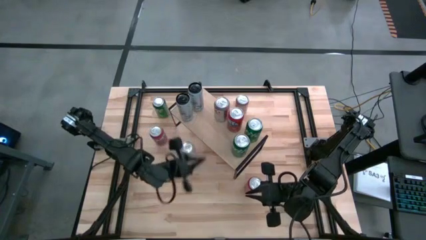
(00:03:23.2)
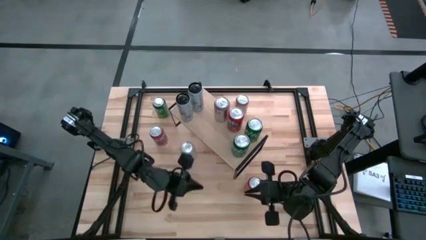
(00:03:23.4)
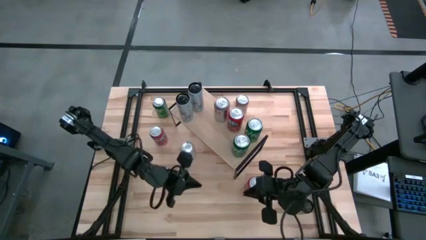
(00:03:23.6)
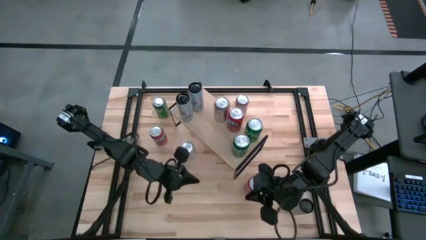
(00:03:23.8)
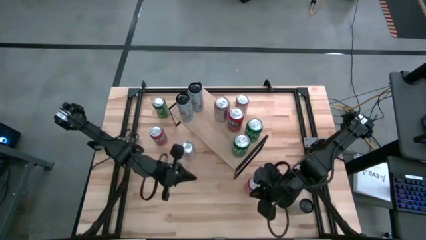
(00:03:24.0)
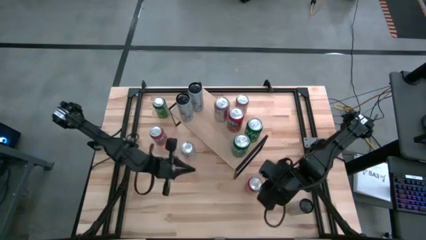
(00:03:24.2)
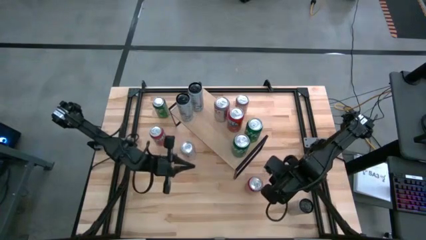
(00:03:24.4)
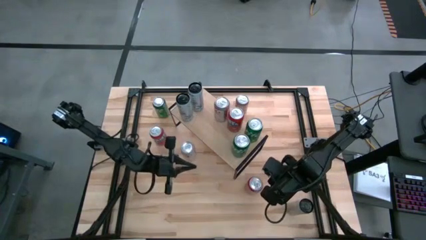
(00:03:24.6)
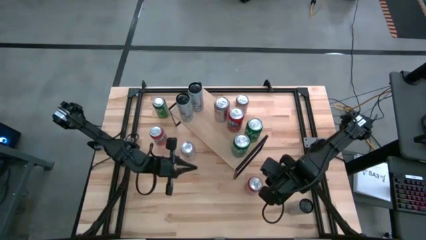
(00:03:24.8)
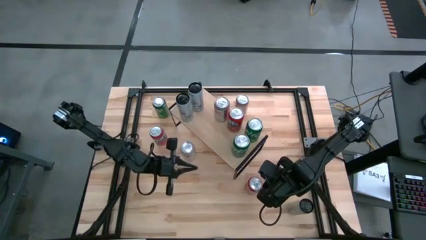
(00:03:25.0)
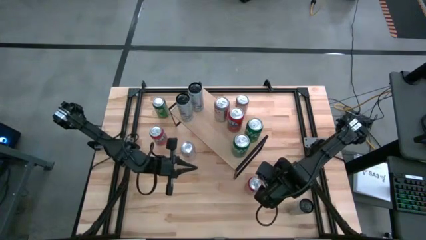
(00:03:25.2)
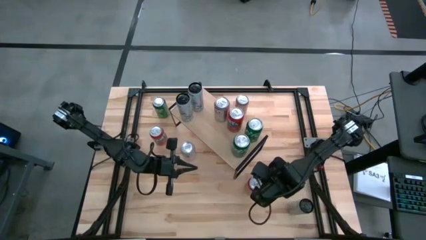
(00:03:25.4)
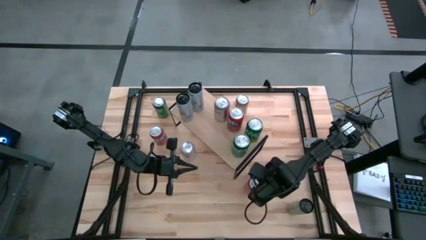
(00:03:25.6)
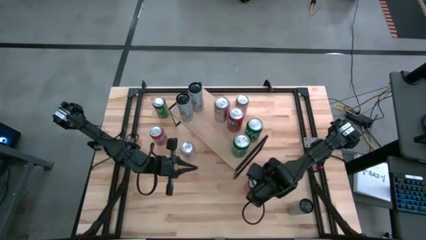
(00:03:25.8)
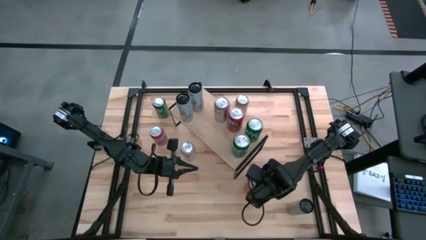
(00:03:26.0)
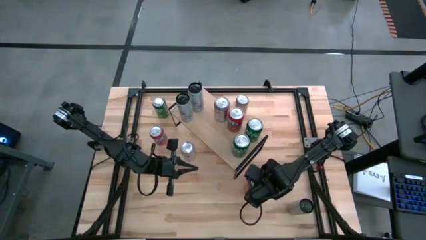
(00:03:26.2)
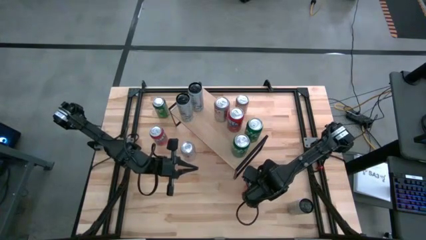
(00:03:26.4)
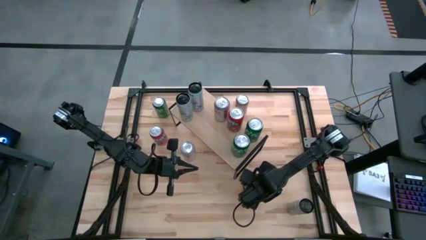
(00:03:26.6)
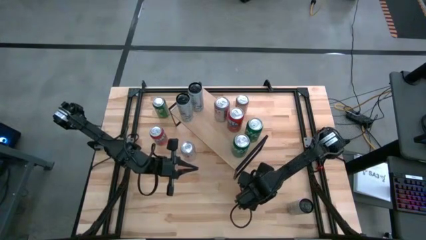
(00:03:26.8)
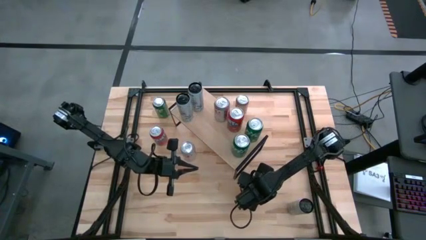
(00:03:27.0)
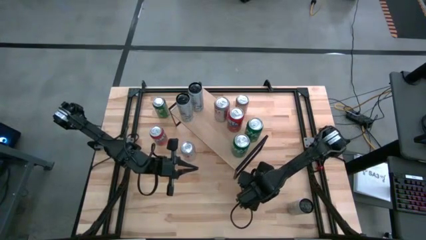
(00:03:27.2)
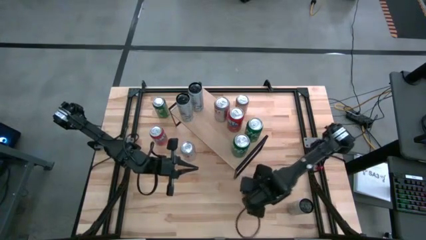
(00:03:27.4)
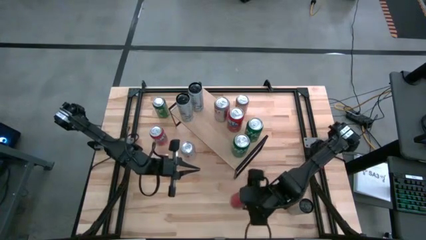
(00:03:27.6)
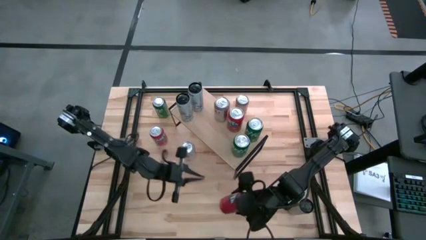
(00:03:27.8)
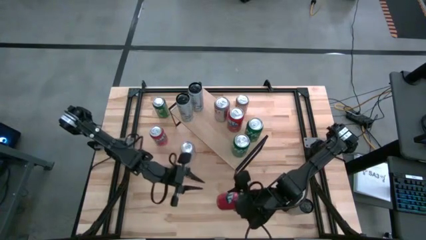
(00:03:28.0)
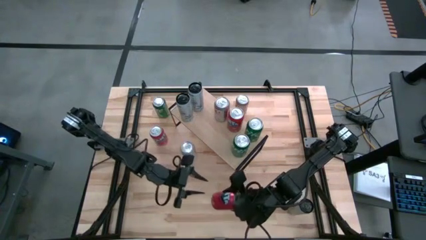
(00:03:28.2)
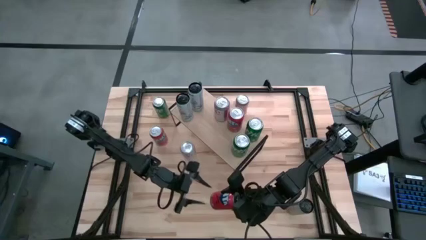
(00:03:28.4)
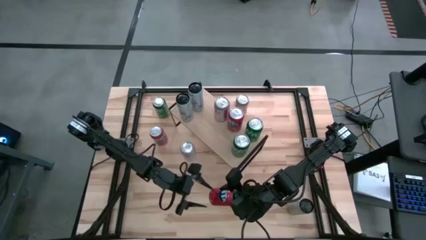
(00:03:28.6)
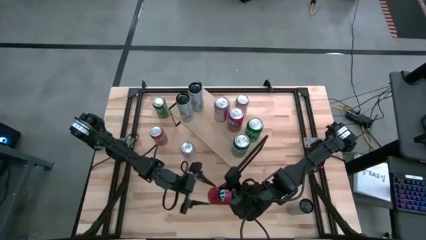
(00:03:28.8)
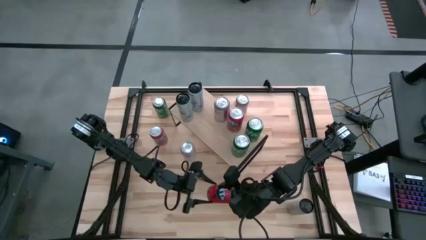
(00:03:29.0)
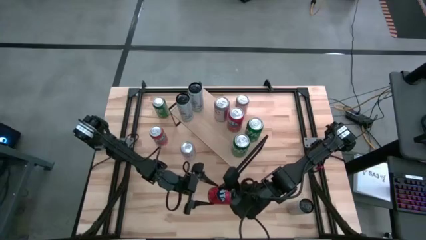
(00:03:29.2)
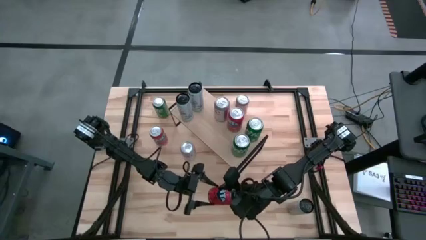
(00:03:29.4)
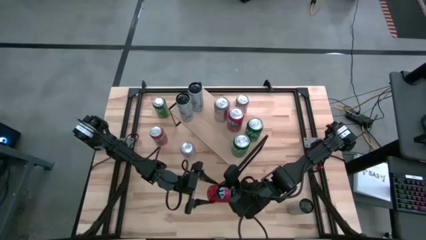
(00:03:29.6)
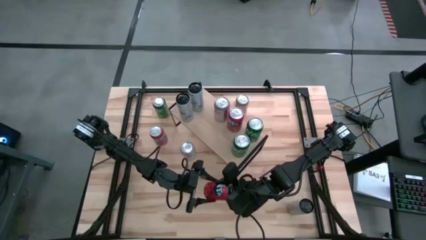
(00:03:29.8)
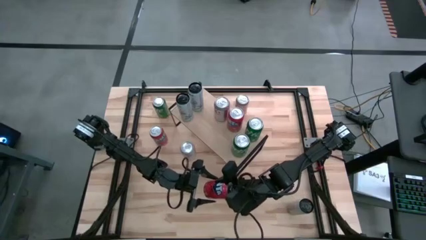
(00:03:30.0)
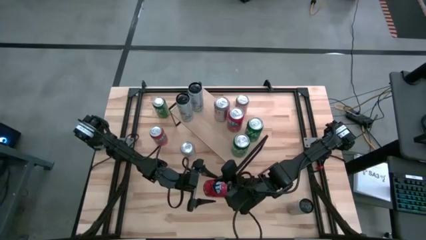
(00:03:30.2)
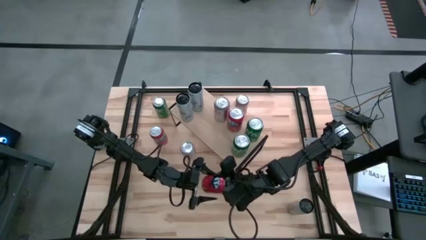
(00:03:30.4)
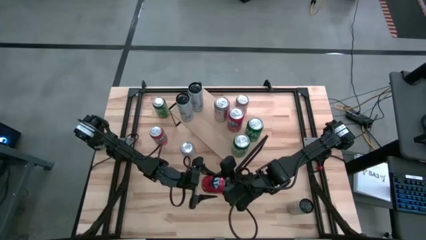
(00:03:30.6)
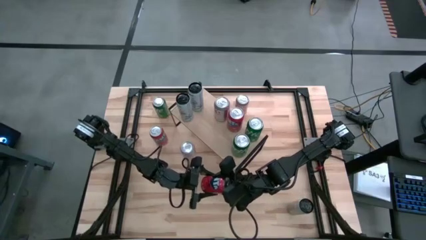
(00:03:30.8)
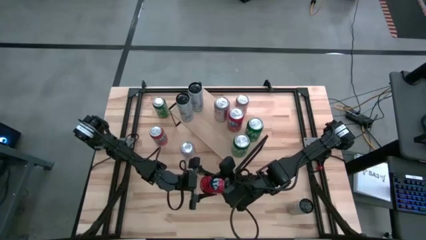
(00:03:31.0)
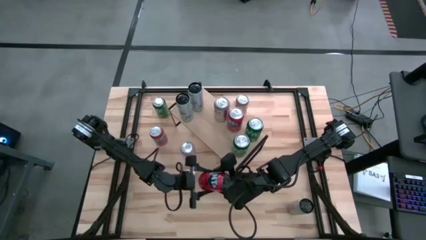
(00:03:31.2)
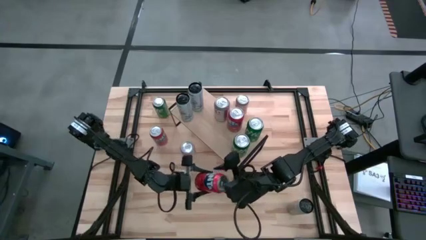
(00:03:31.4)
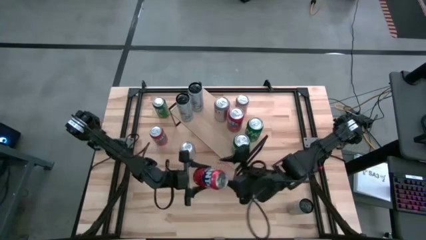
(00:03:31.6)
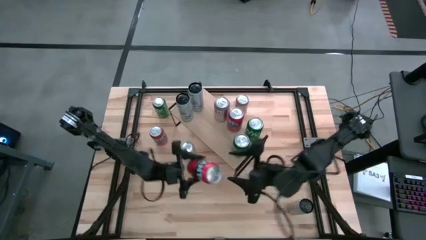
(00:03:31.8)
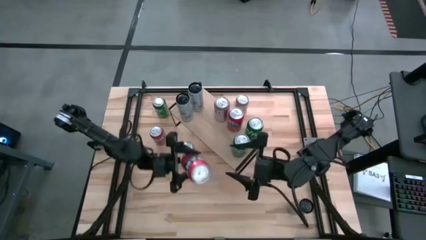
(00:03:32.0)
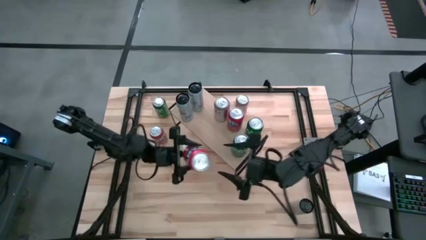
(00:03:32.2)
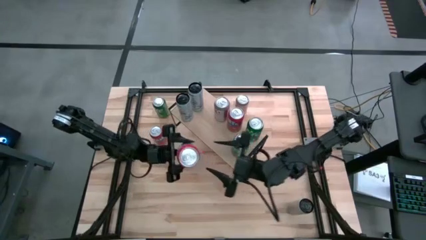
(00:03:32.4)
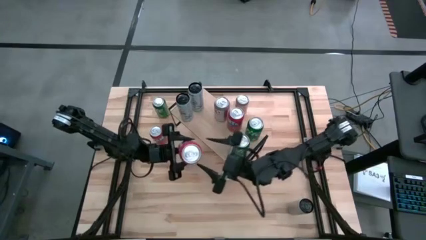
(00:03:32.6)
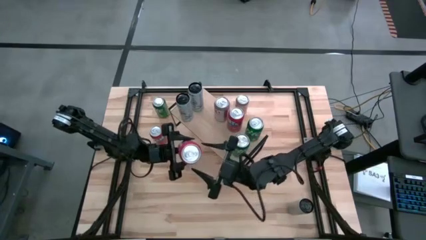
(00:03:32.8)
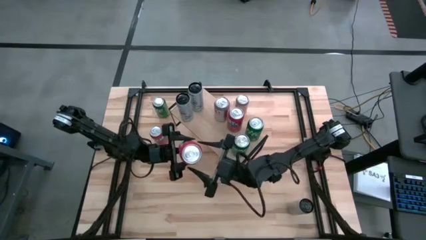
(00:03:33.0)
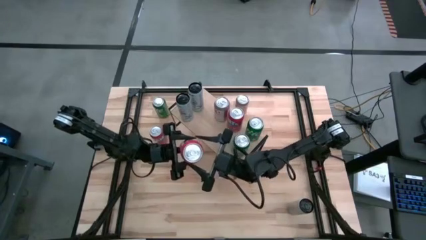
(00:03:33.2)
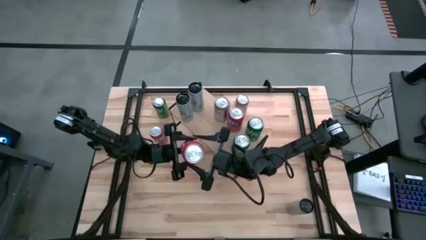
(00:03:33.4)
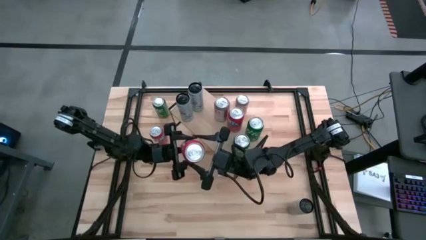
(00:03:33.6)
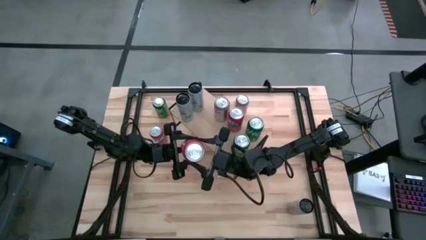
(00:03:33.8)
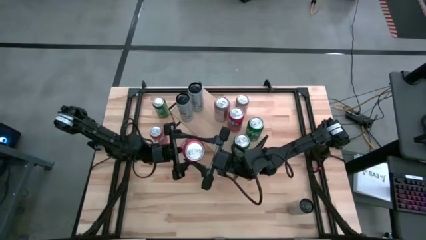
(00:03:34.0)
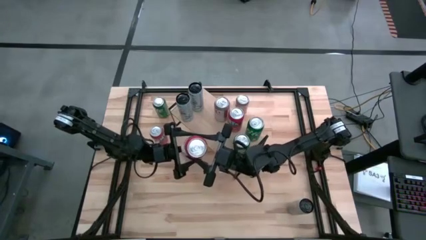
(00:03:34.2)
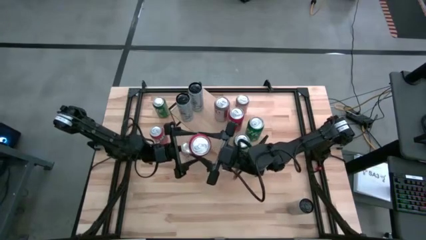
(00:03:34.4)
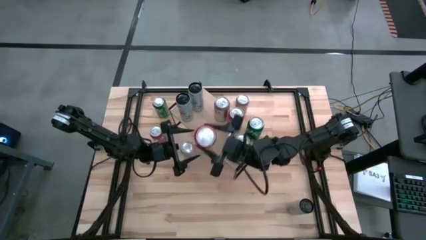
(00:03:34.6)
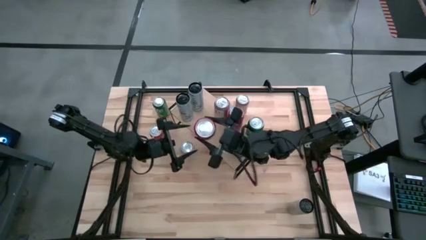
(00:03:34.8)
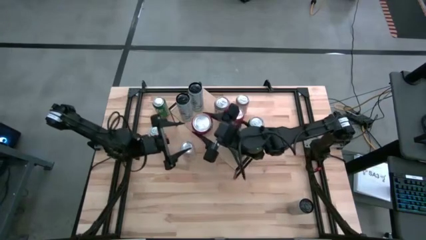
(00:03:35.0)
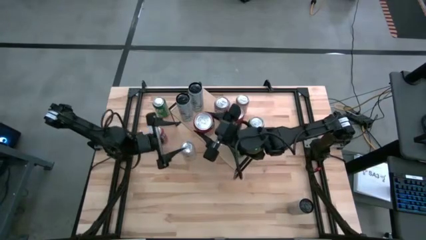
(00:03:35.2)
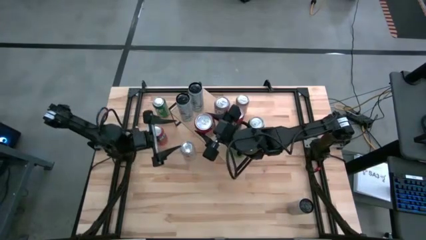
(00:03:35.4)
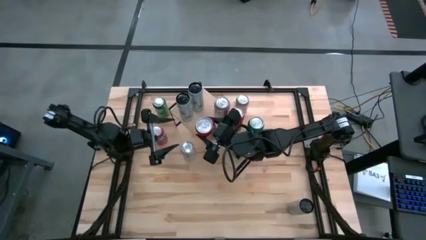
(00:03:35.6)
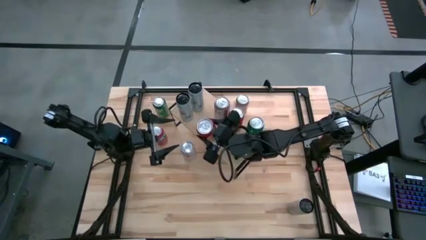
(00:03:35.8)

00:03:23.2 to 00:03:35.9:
Task: Place canned beverage on shelf
Put the right orange soda can on the shelf aligned with the other orange soda can

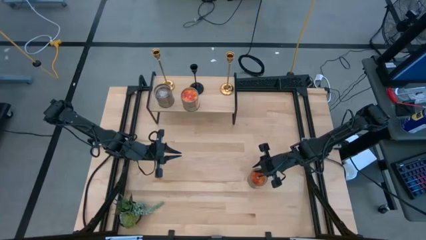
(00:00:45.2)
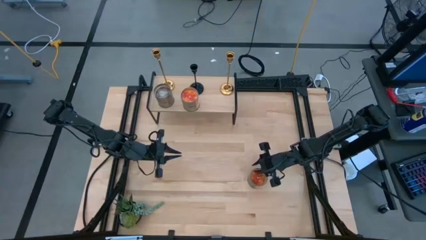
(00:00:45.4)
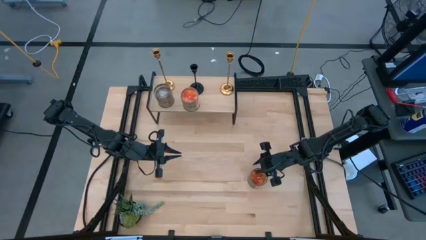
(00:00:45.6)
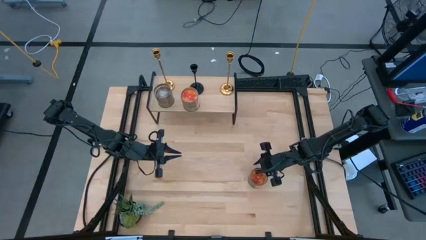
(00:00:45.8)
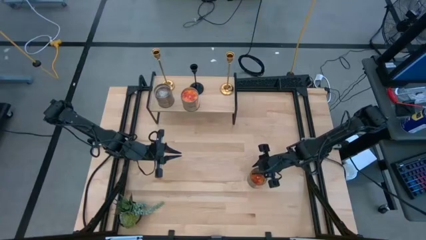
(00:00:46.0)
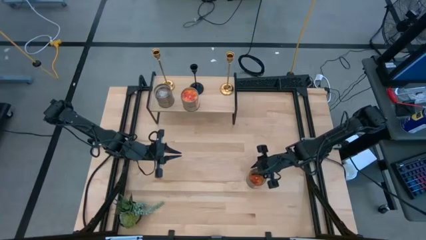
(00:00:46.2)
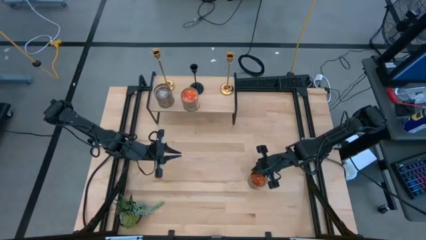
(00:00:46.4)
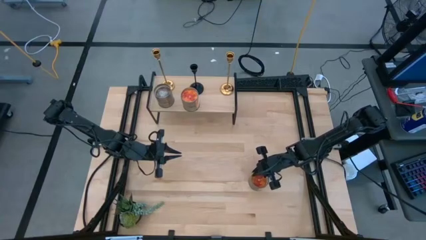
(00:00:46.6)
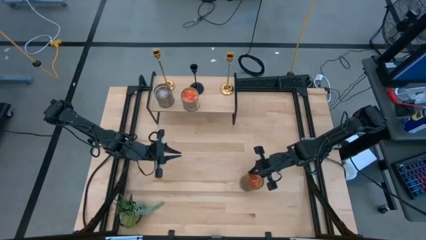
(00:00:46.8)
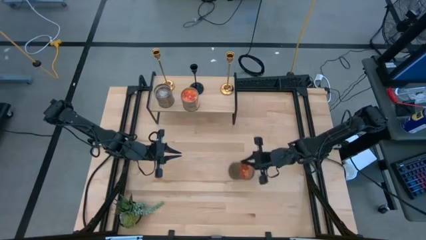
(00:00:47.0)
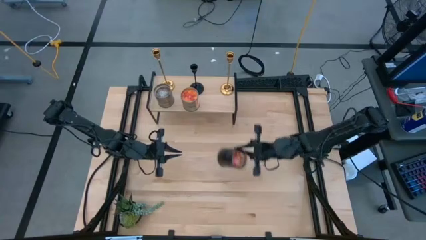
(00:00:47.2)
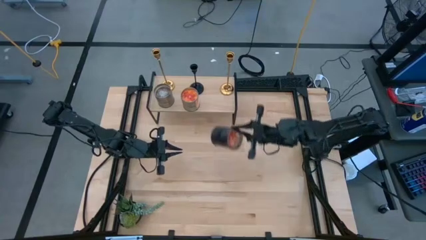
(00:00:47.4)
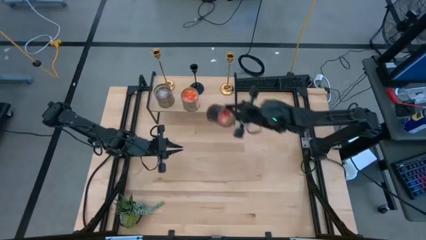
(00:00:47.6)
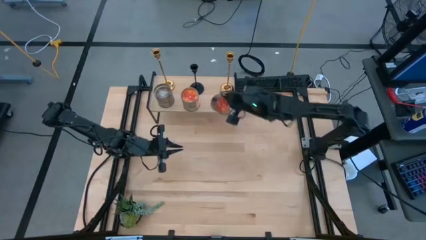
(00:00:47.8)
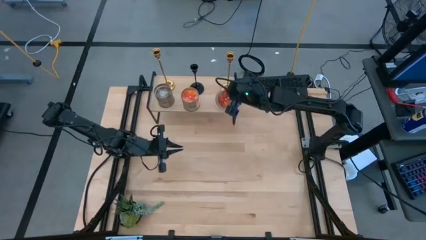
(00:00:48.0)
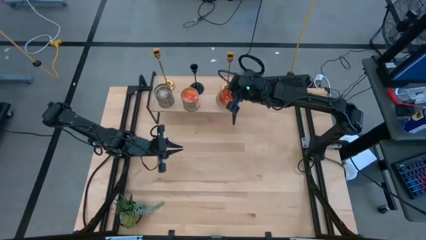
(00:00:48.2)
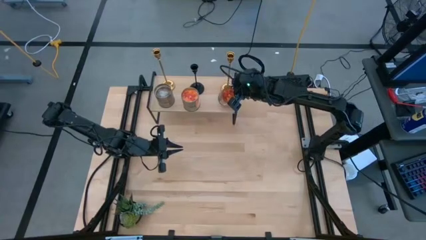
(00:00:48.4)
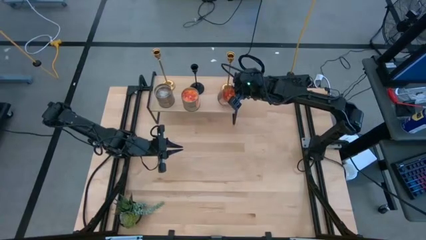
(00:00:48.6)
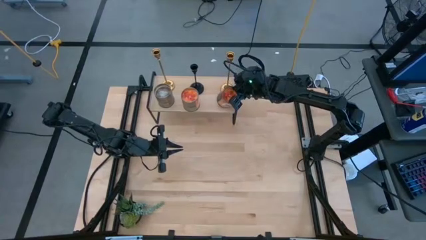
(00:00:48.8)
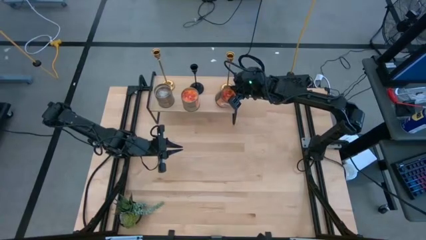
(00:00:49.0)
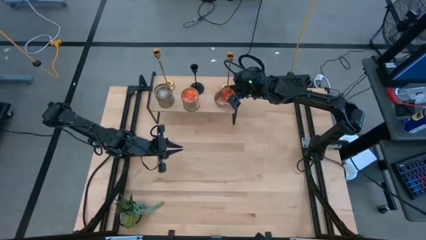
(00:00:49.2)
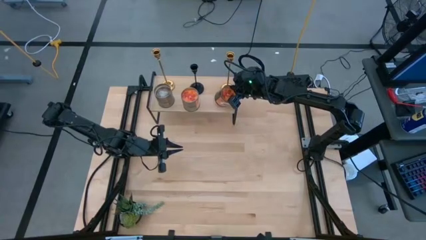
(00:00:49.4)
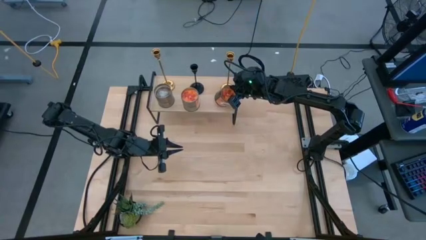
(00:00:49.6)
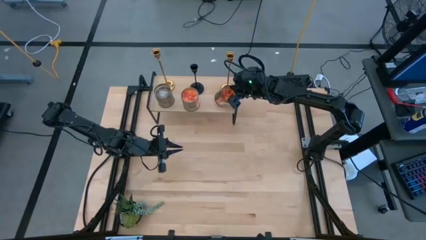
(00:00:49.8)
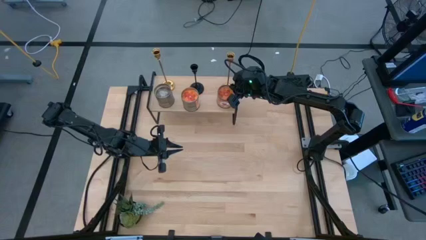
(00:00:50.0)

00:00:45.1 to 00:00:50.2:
Task: Pick & Place candle stick holders
Put the orange scented candle on the shelf
